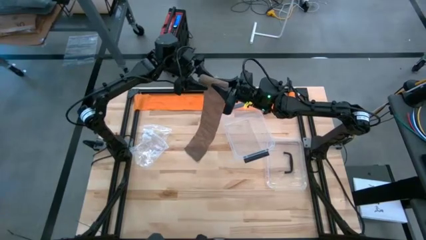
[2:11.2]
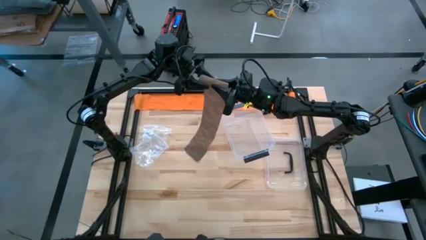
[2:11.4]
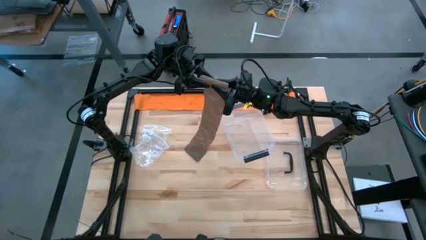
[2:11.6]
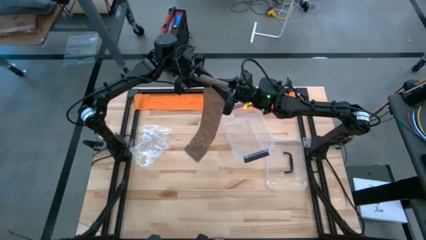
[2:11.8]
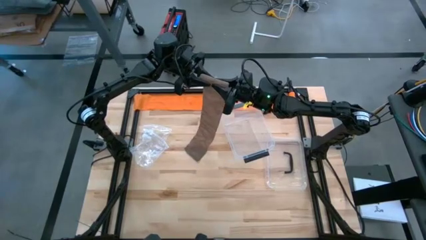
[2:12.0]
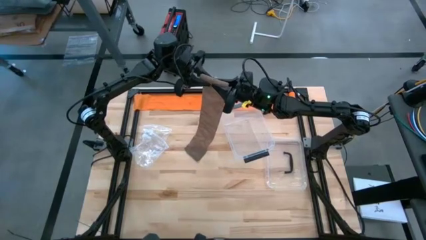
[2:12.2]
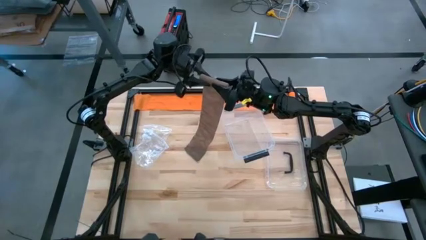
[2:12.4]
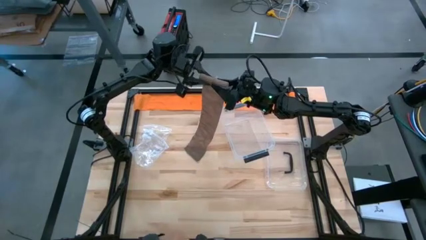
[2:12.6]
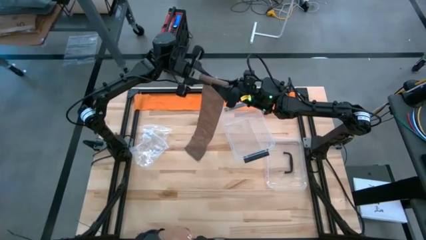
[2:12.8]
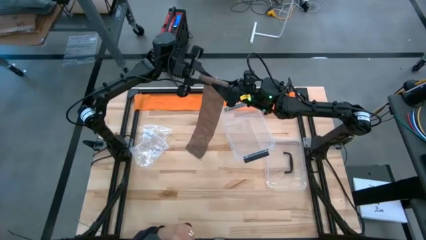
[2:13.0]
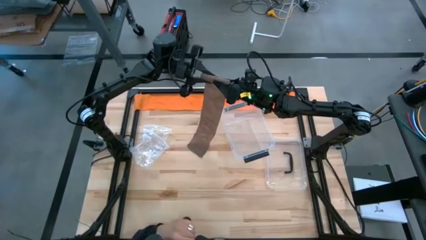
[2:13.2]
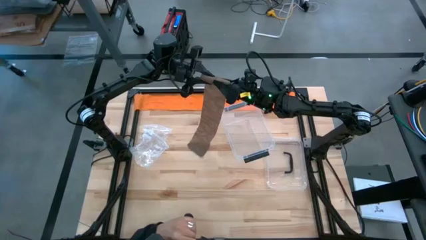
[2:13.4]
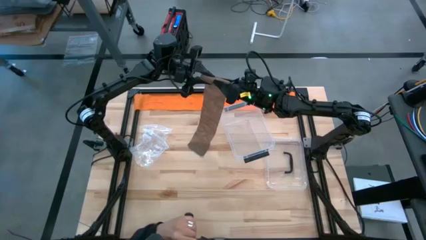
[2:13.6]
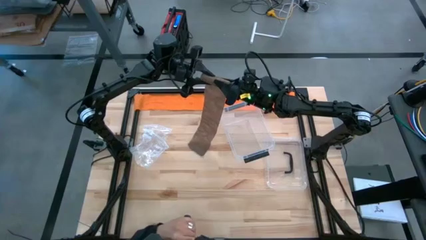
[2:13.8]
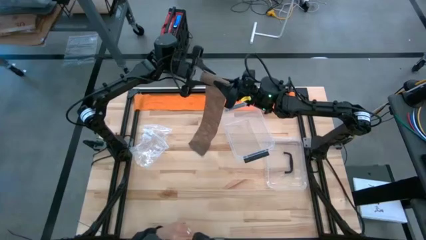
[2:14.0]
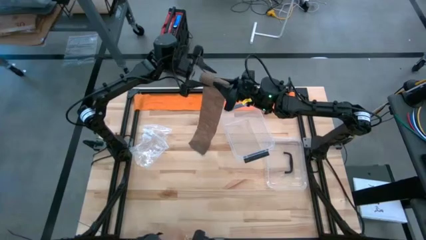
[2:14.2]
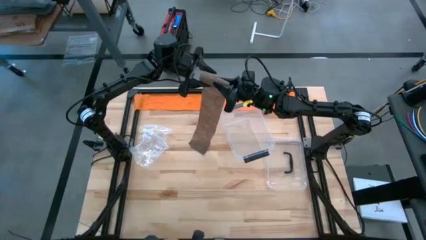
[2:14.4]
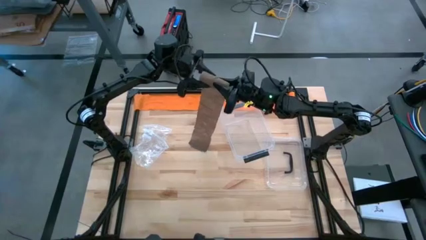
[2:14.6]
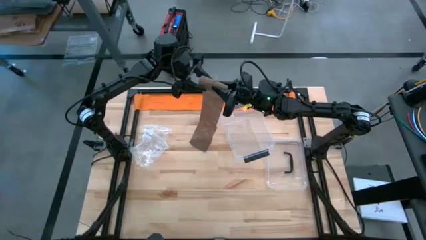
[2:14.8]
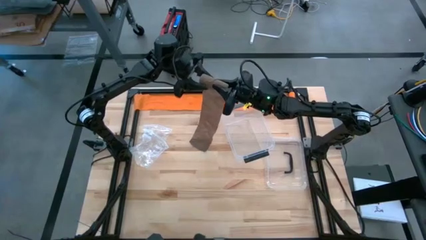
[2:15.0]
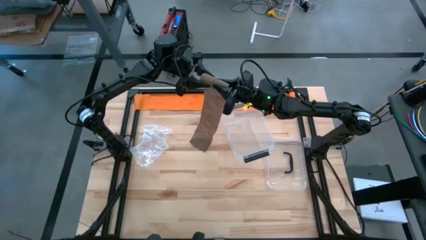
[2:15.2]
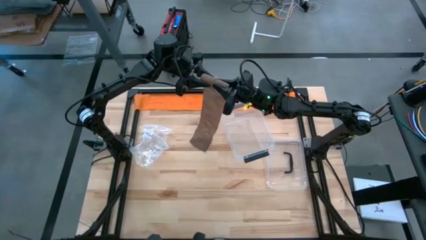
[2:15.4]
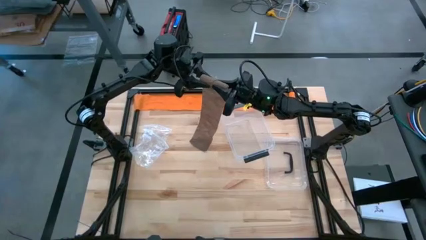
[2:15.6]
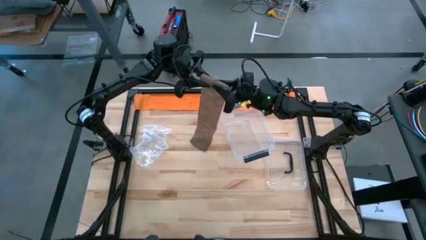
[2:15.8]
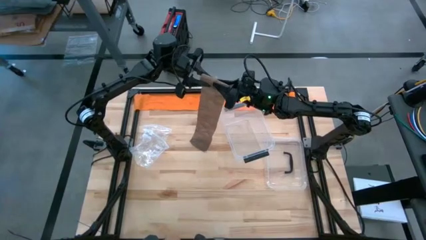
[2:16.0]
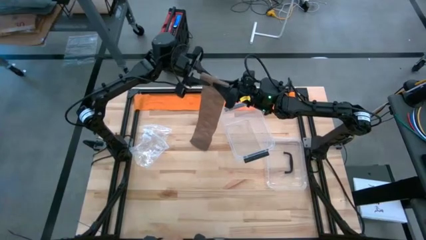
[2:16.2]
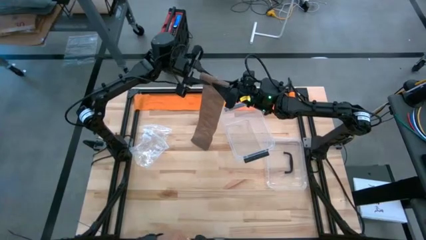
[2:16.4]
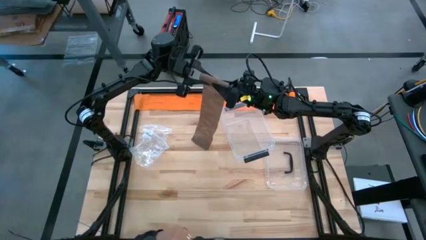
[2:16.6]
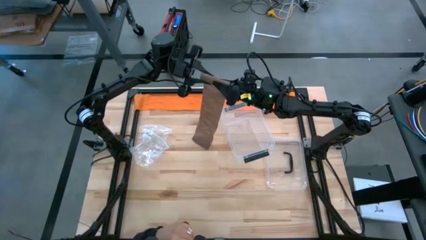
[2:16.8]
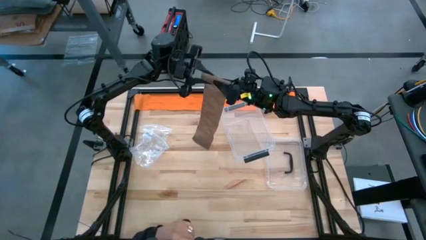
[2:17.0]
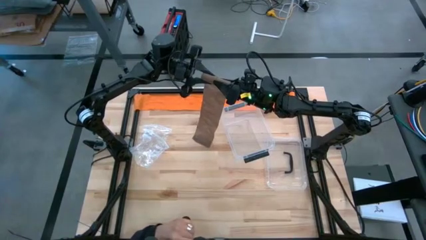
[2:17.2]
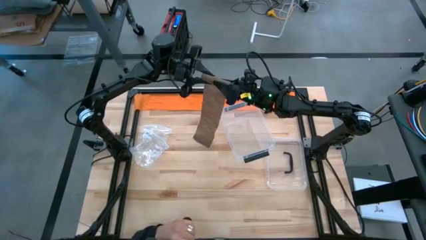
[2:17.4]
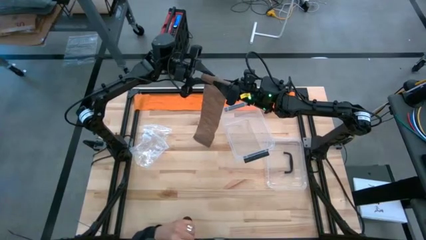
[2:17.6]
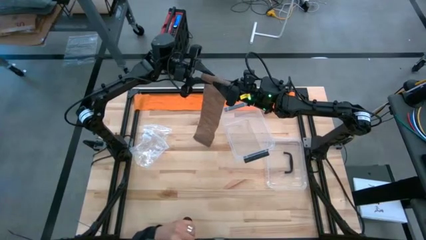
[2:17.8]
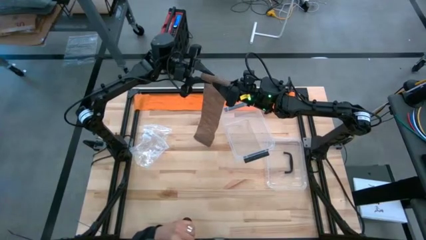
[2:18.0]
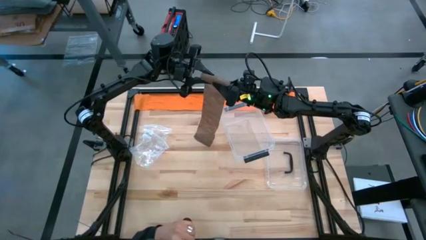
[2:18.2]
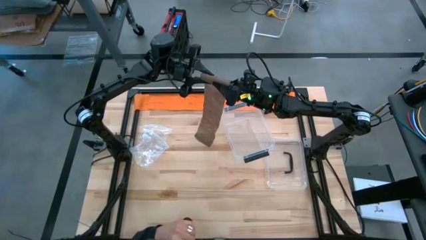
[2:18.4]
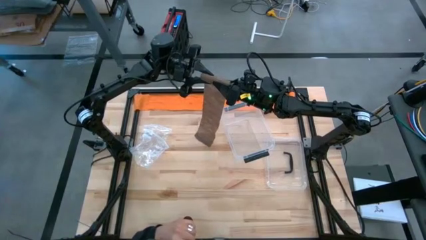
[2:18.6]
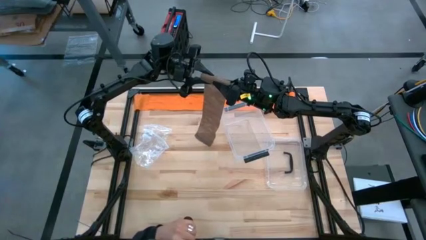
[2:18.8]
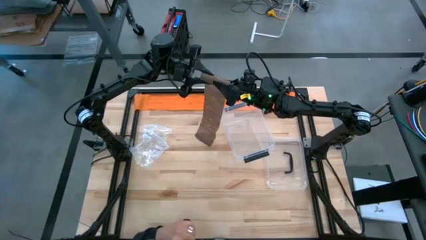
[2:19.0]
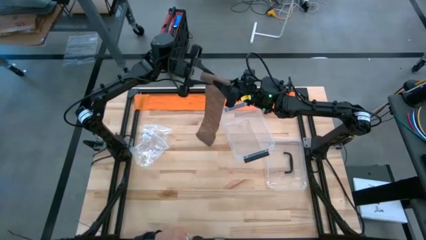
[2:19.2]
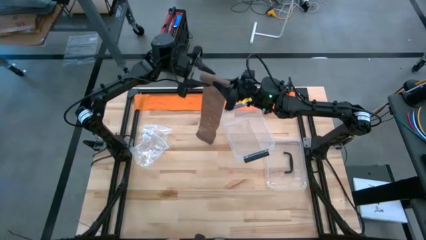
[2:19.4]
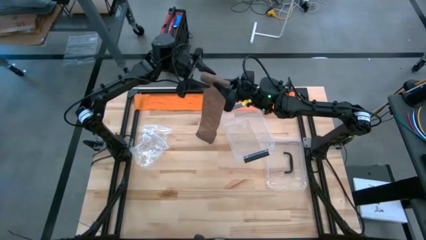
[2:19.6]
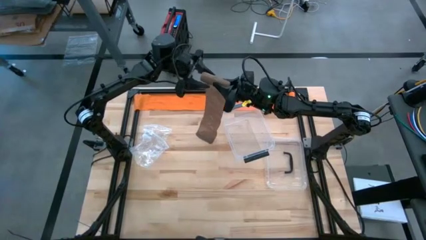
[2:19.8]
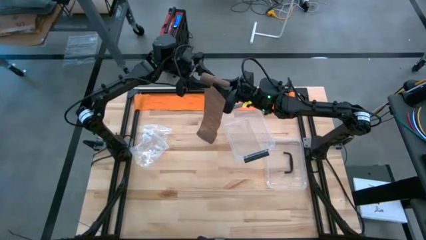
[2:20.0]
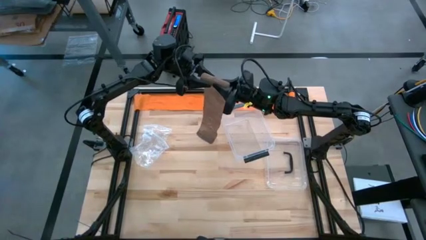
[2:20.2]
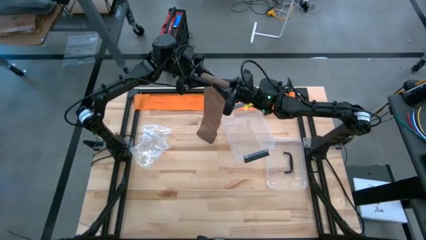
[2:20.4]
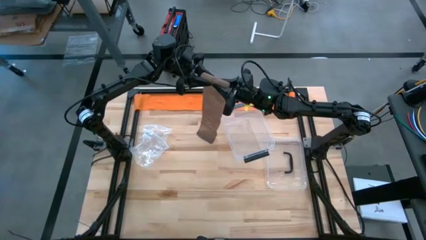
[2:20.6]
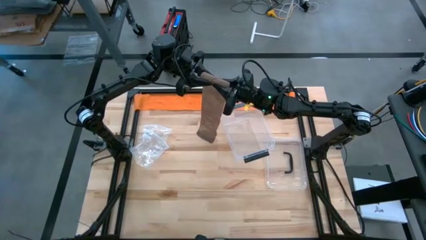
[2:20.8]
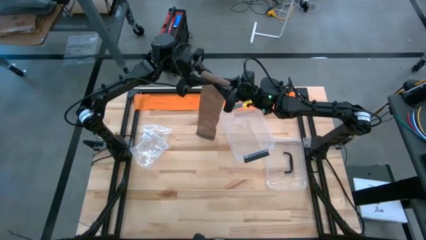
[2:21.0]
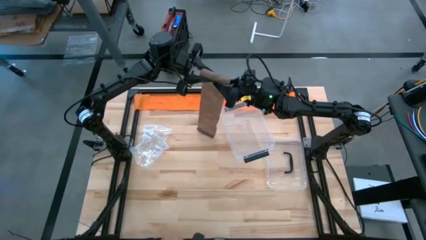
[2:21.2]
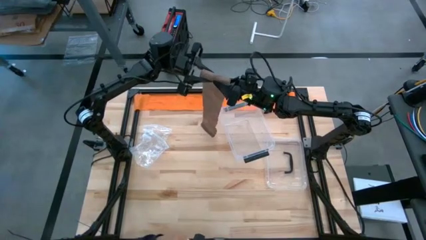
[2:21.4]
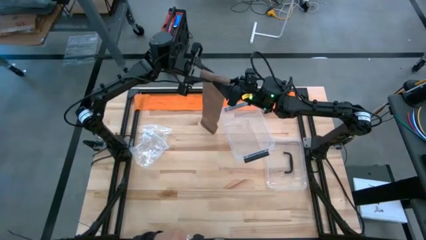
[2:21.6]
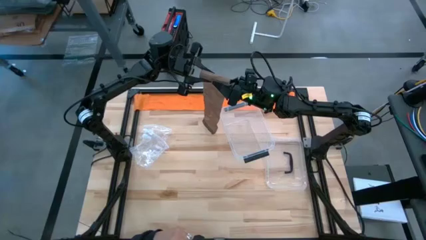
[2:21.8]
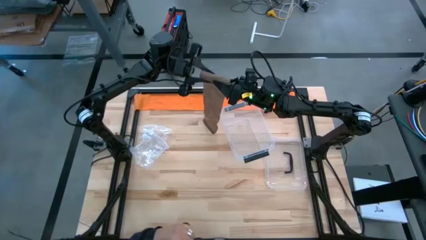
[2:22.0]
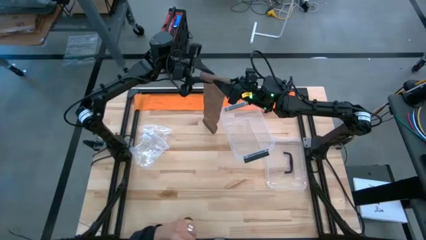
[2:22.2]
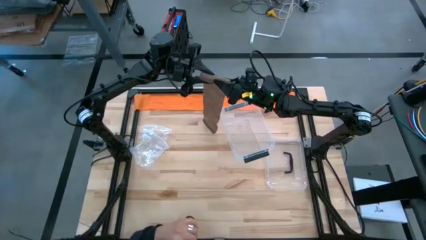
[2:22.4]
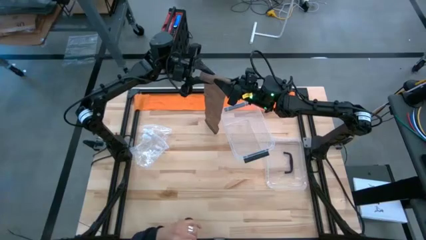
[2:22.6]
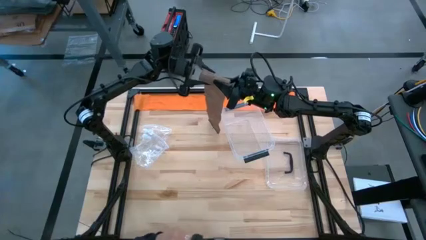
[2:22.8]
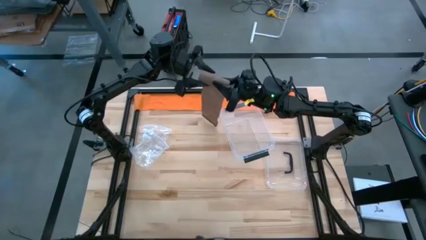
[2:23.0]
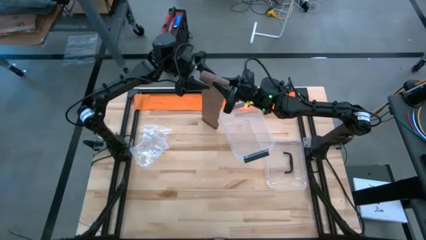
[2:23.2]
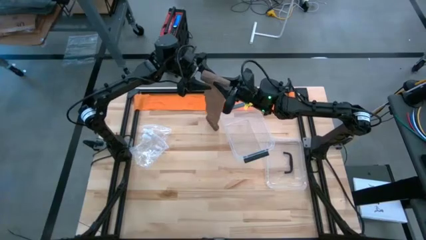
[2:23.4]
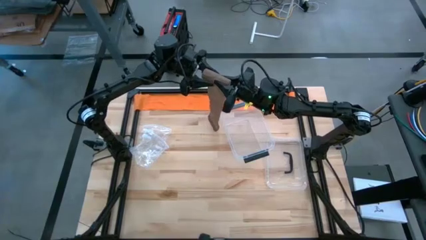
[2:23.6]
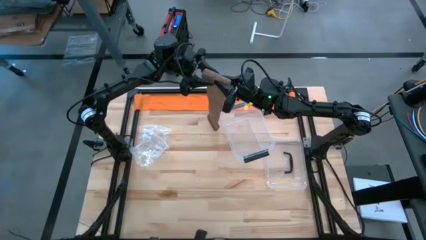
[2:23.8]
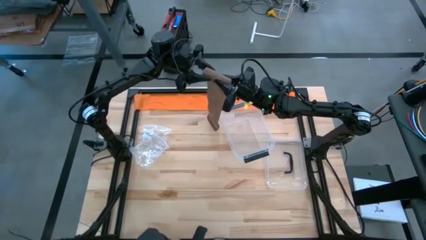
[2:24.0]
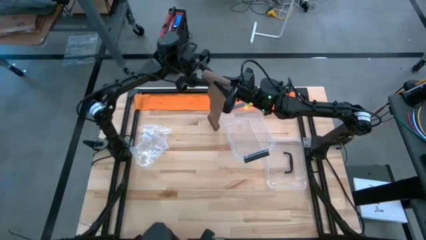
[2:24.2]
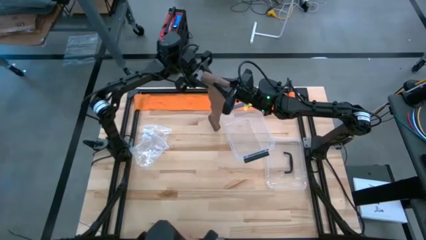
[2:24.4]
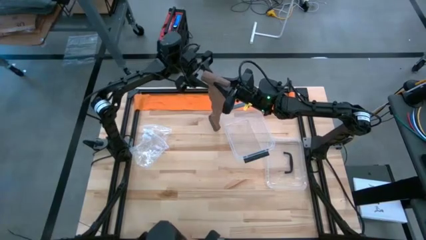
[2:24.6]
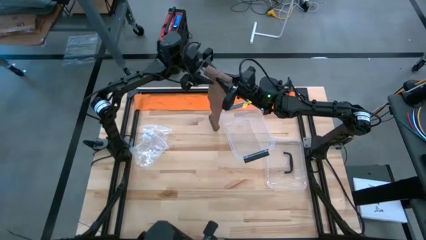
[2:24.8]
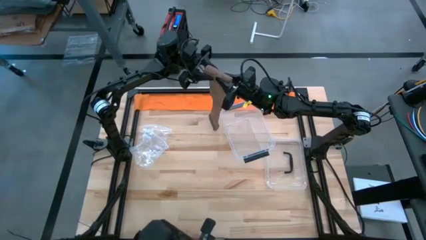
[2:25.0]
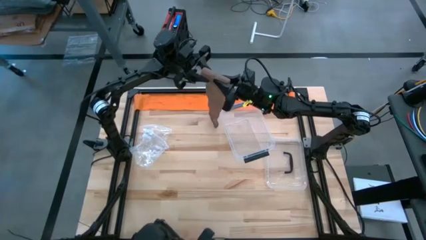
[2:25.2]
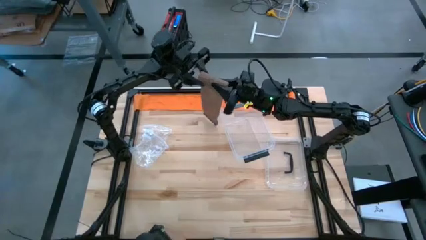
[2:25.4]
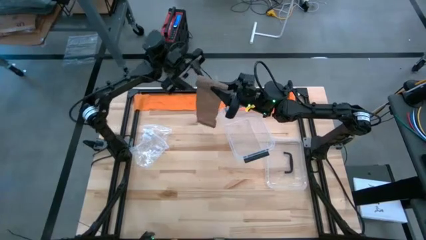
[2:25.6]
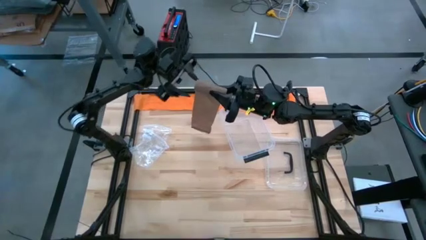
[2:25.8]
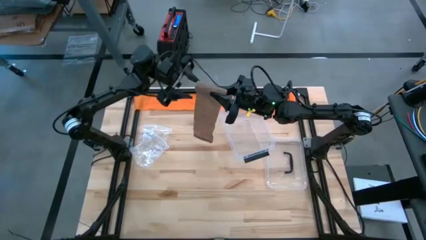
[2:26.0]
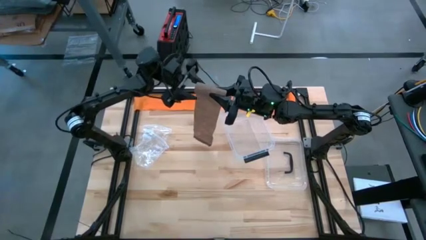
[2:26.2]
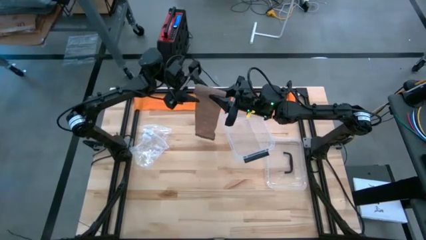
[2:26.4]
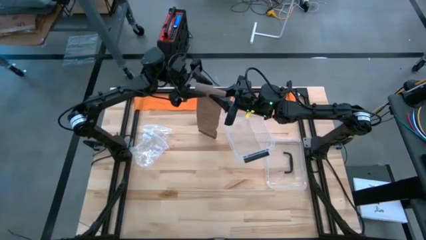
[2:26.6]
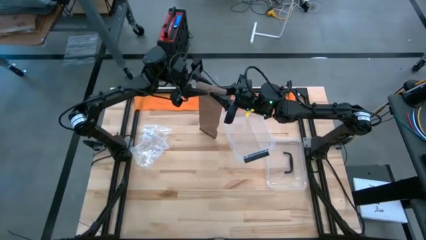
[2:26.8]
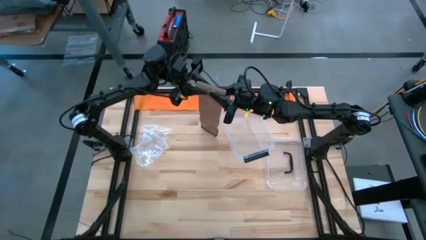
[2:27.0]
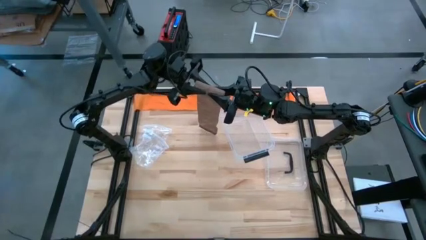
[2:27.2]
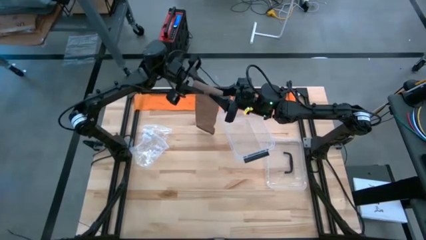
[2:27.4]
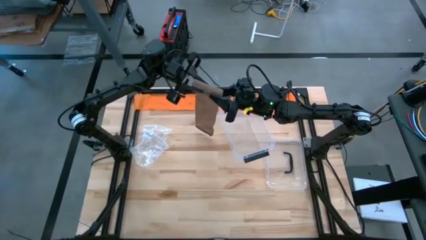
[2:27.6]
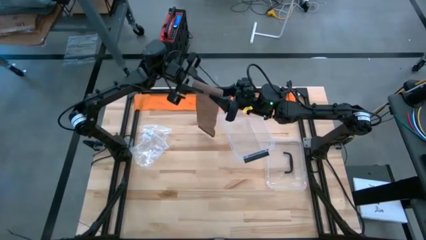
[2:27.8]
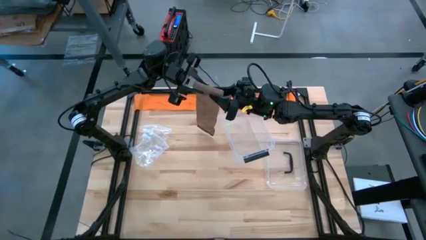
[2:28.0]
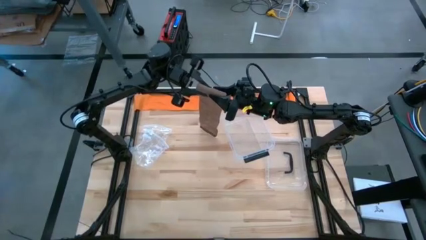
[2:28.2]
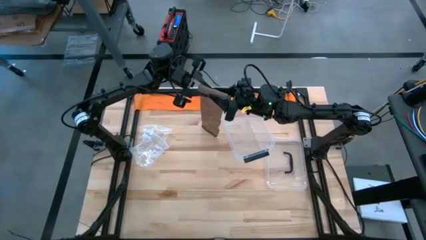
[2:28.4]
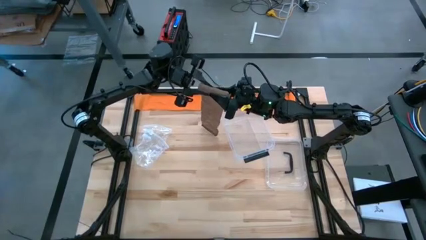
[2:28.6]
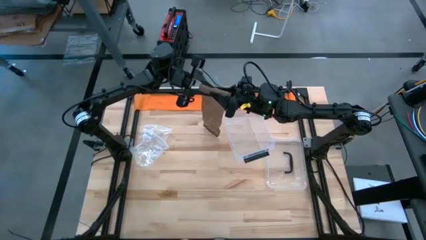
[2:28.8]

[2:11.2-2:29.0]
Task: Roll bandage
Roll the brown bandage
